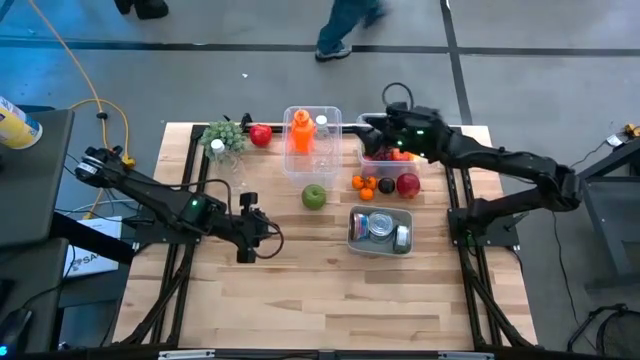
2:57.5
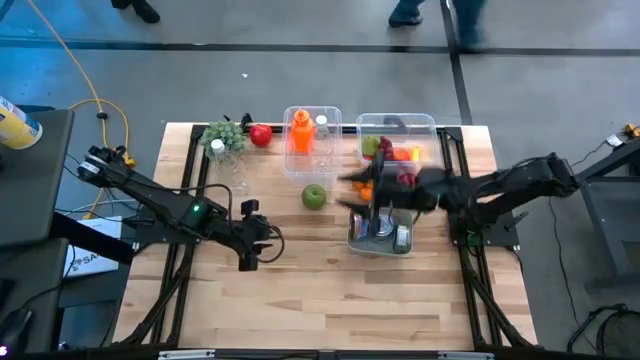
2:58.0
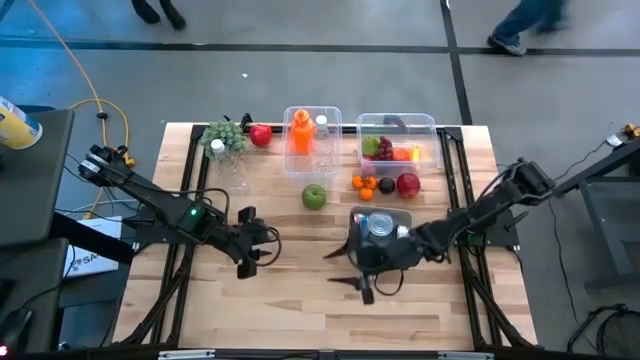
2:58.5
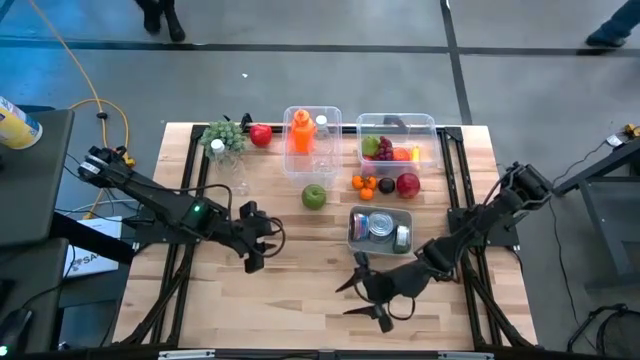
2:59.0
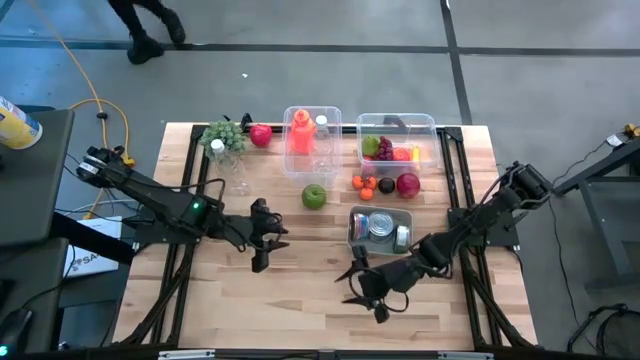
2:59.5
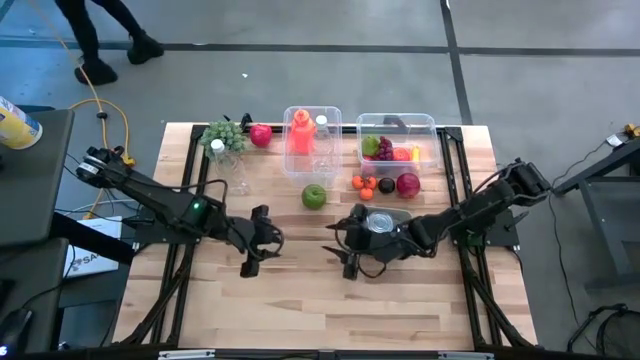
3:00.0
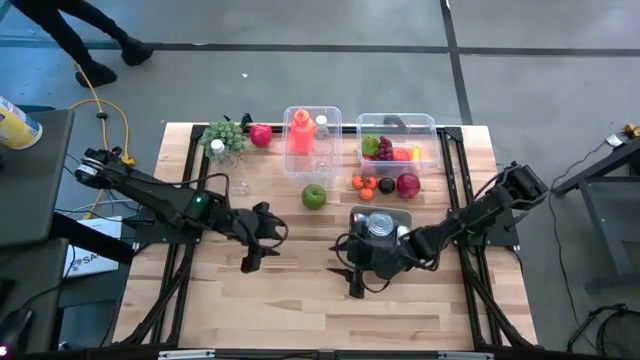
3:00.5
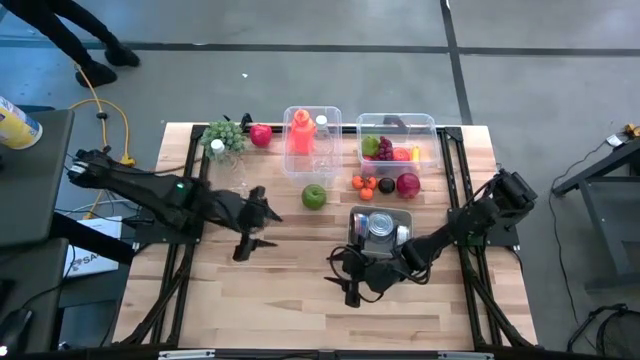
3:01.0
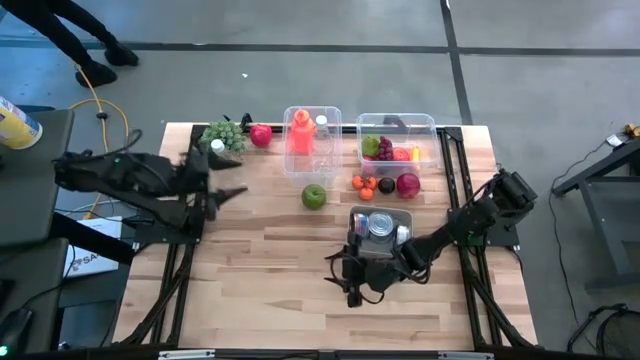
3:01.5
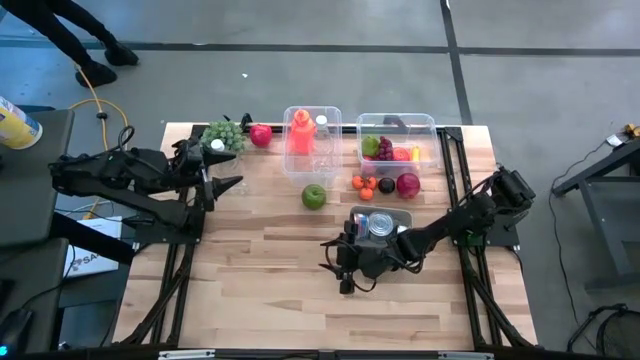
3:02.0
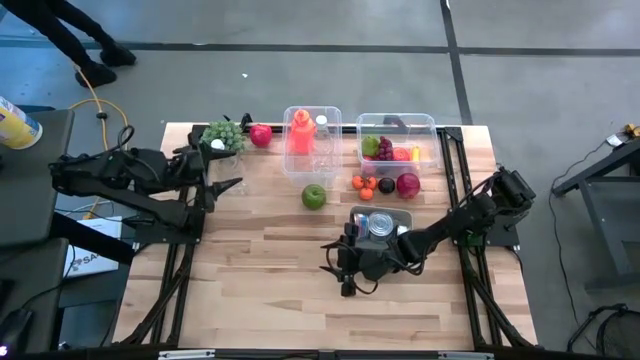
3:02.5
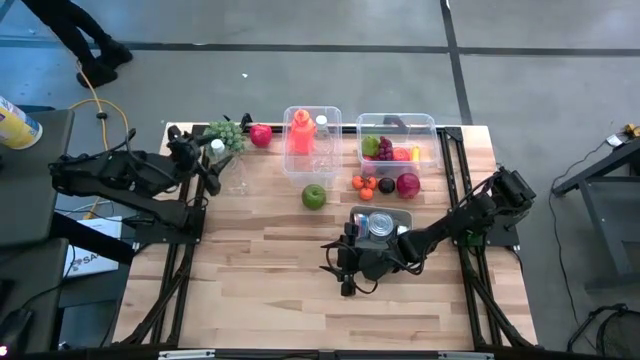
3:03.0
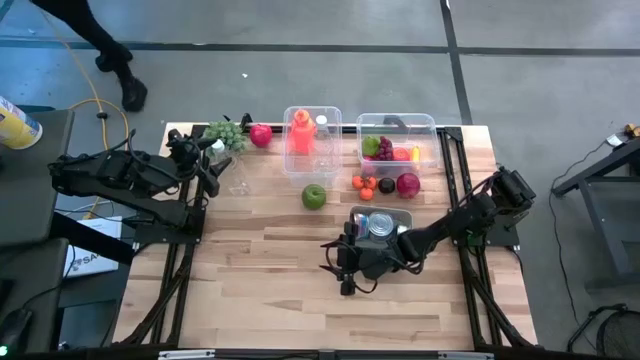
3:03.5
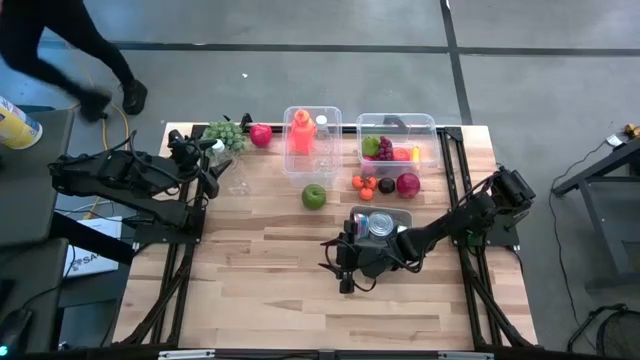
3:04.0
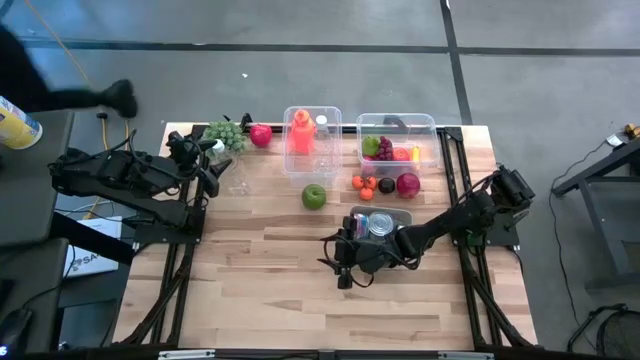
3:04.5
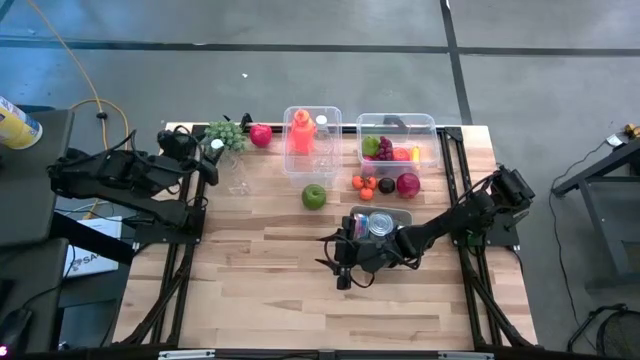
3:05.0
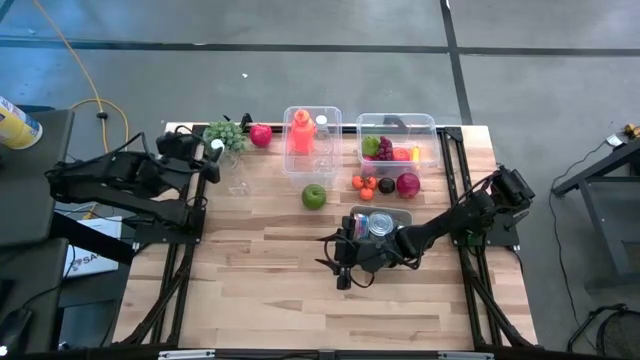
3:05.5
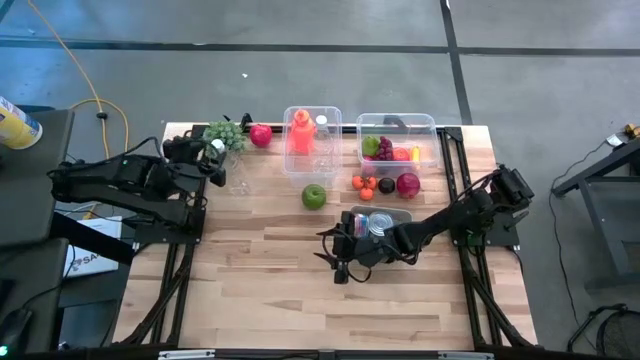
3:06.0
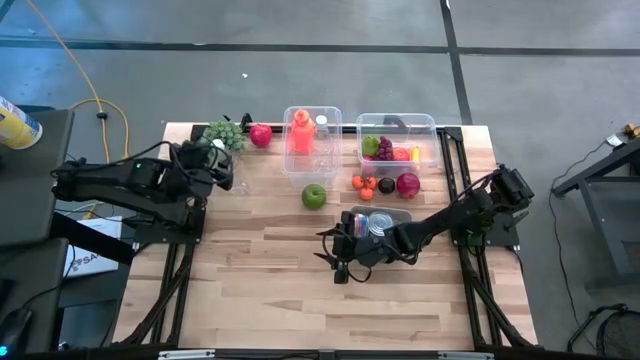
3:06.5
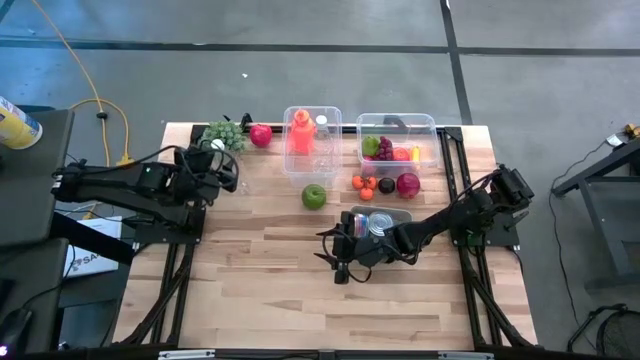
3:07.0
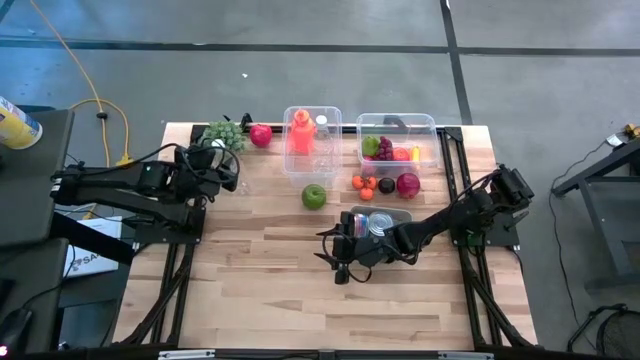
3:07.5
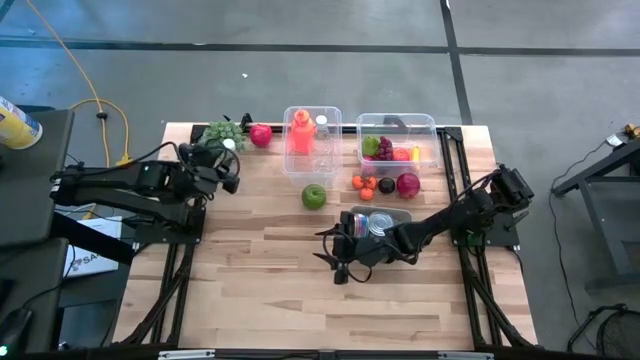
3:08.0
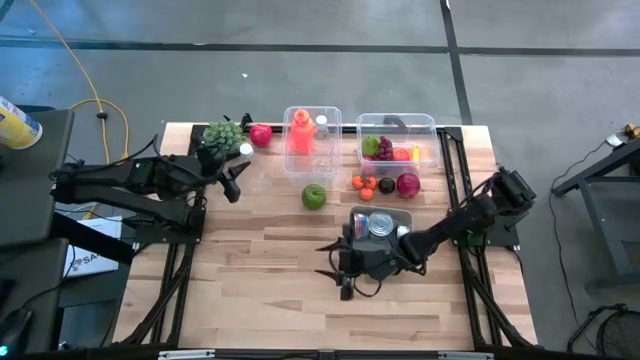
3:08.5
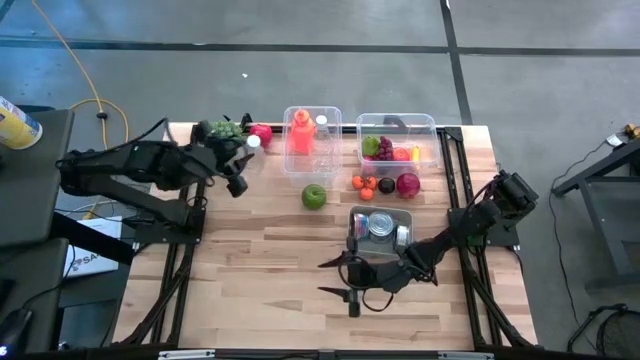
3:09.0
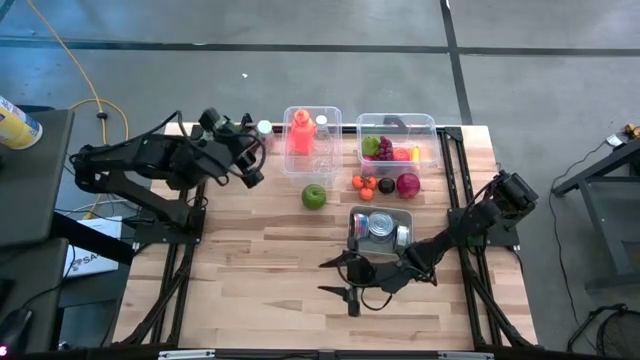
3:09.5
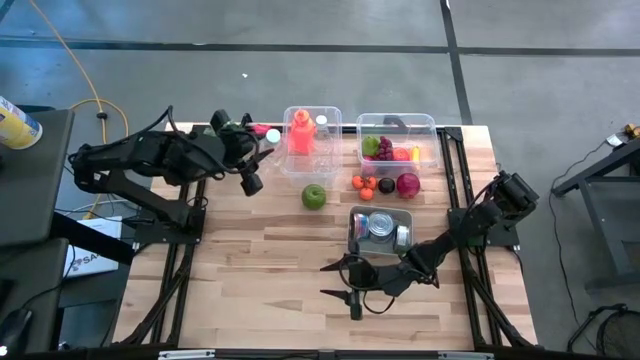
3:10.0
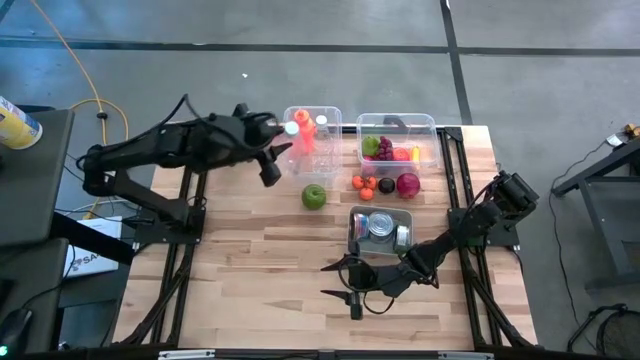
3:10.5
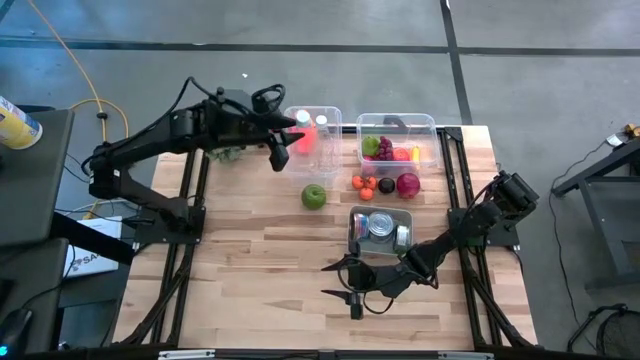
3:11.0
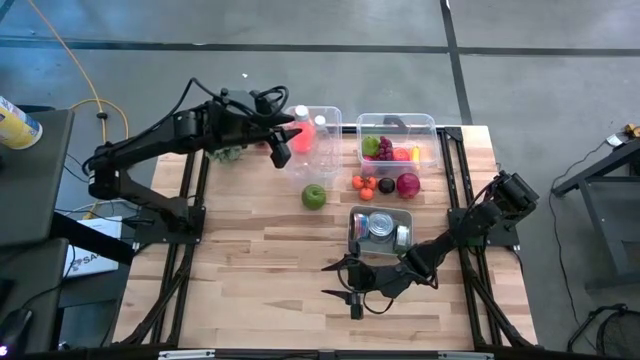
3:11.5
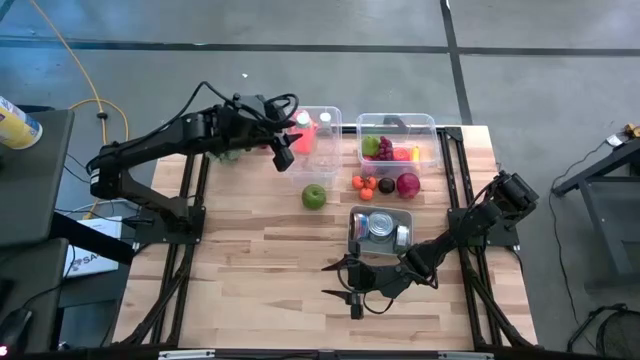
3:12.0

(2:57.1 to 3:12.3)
Task: Pick & Place Food Item
Put the transparent water bottle into the left transparent bin

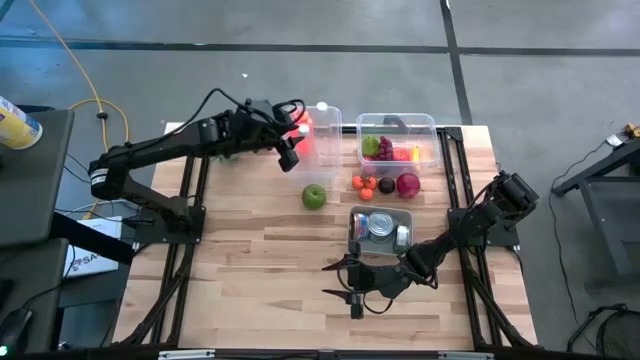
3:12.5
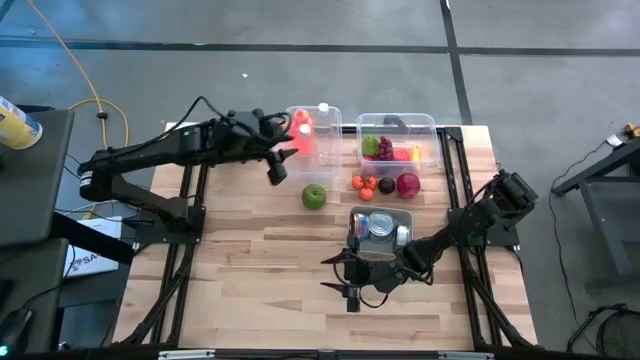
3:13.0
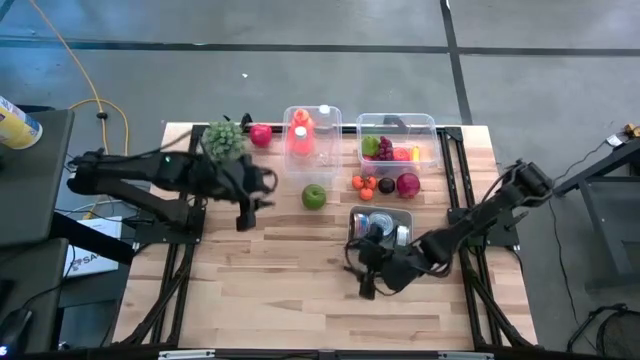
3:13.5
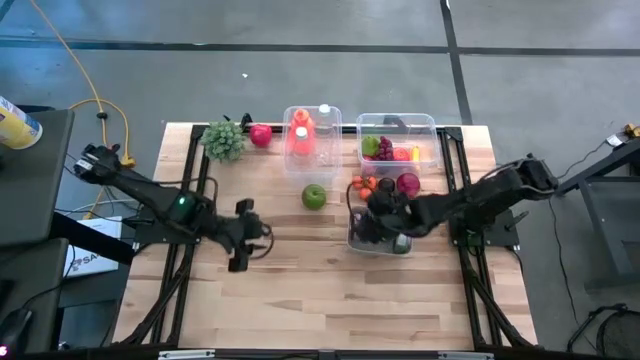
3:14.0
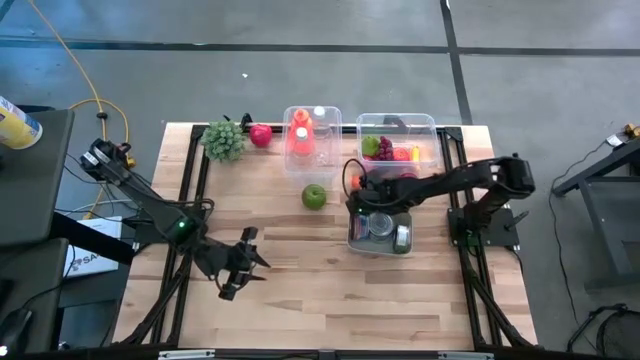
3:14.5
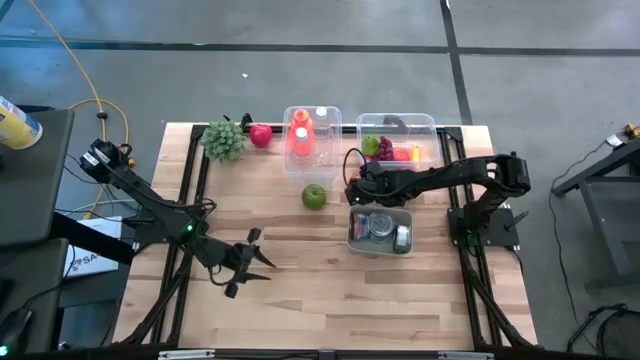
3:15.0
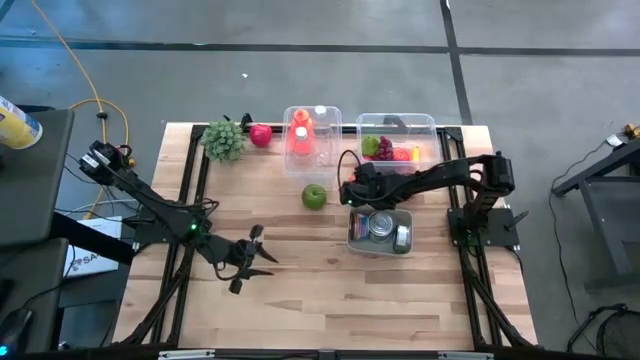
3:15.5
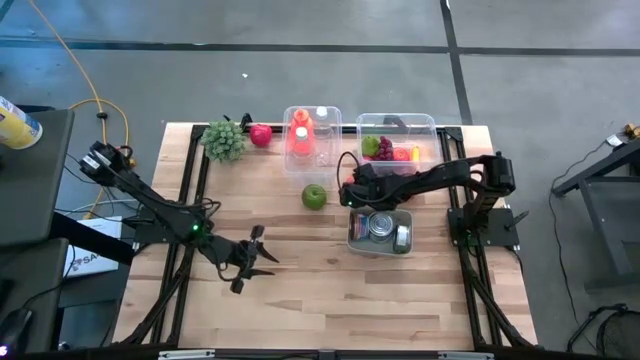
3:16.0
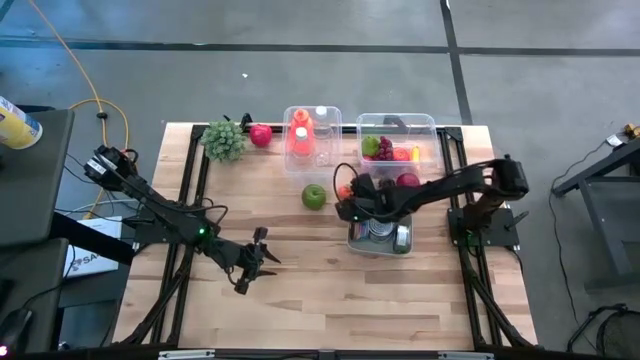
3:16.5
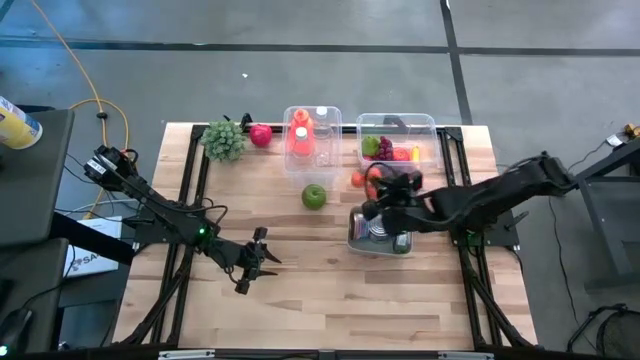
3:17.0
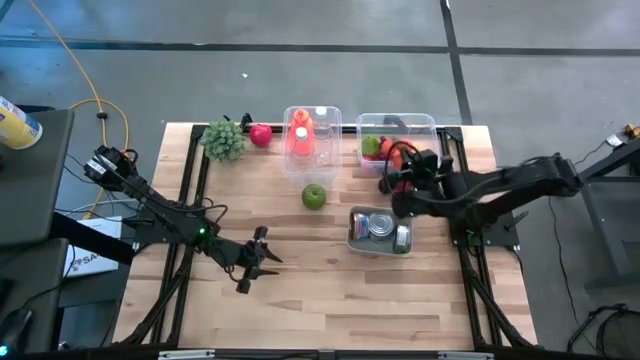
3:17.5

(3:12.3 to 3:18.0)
Put the tangerines into the right transparent bin

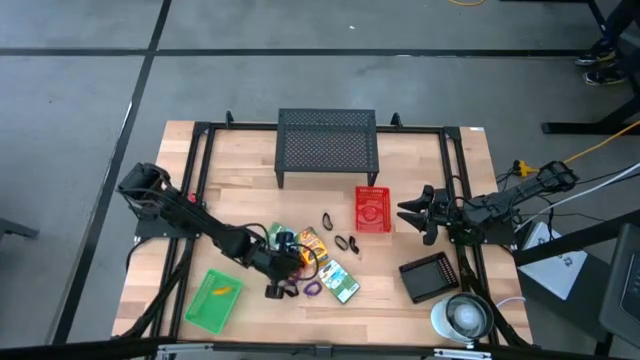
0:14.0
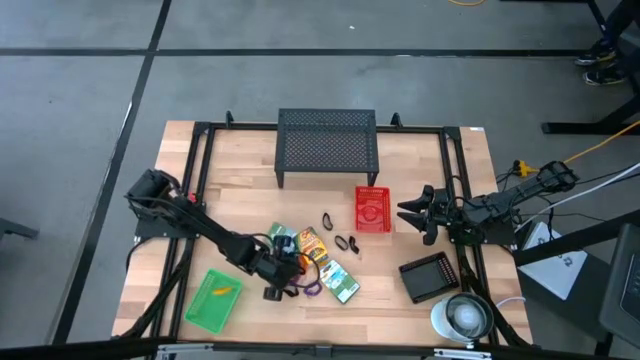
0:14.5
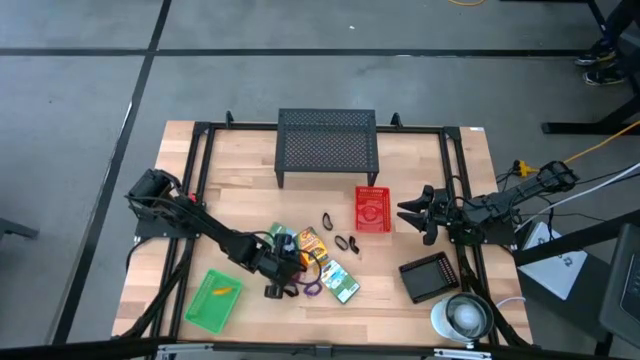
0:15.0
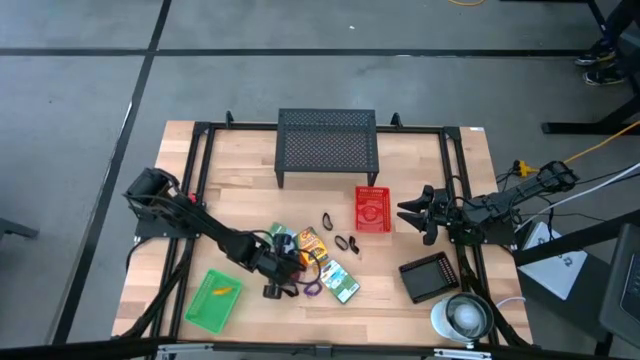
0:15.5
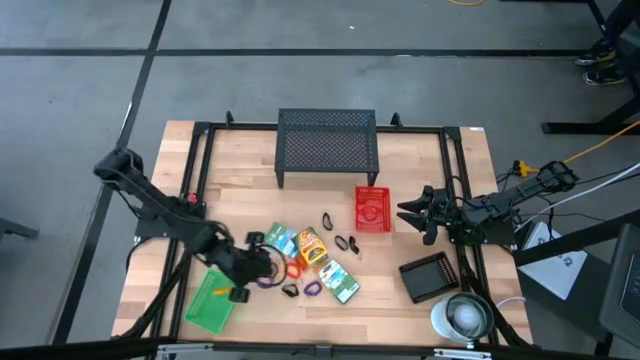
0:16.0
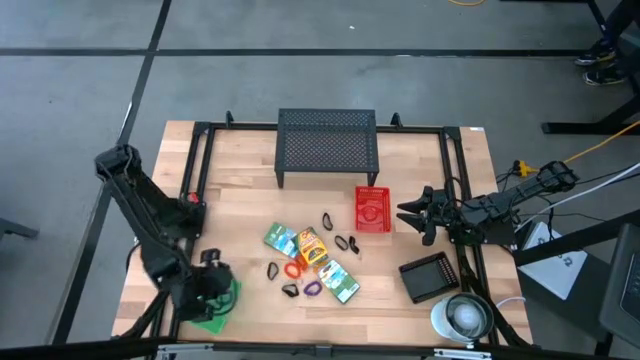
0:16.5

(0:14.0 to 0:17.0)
Task: Pick & Place Office Desk Supplies
Put the violet spring keychain into the green bin
